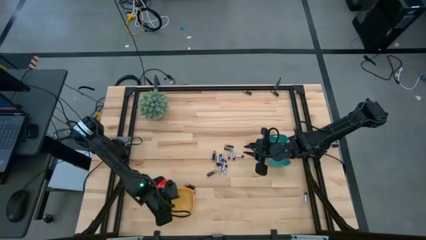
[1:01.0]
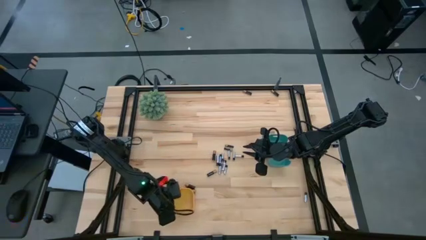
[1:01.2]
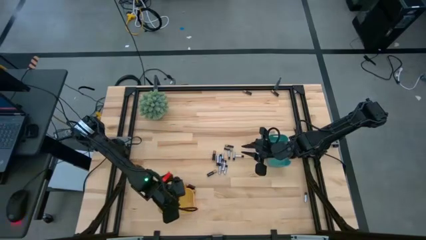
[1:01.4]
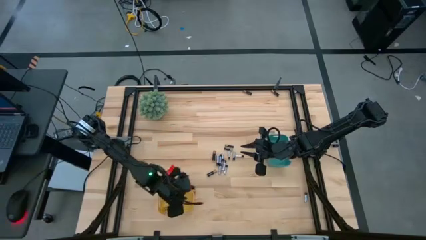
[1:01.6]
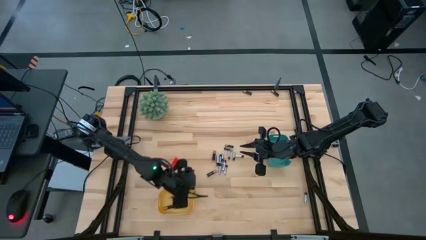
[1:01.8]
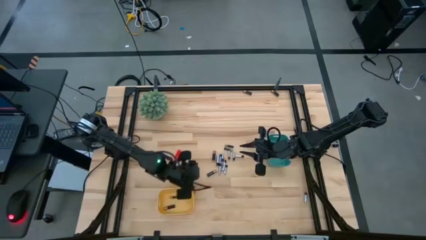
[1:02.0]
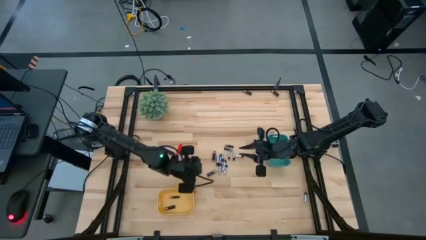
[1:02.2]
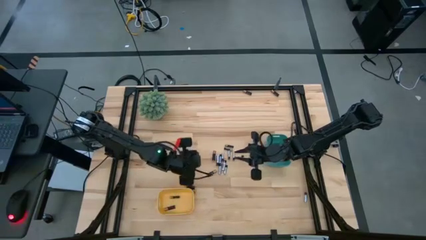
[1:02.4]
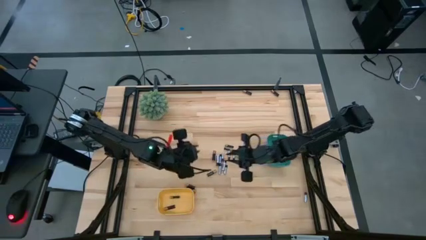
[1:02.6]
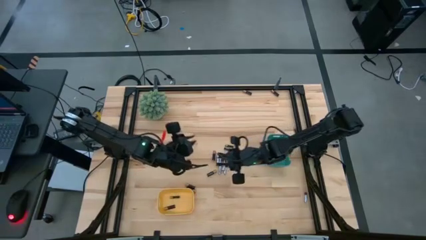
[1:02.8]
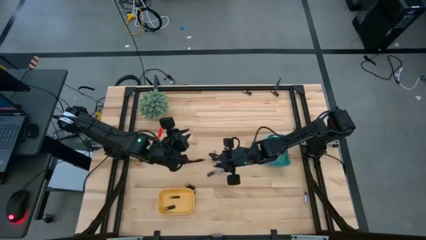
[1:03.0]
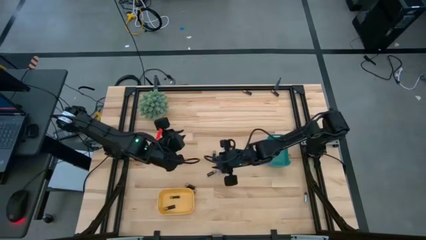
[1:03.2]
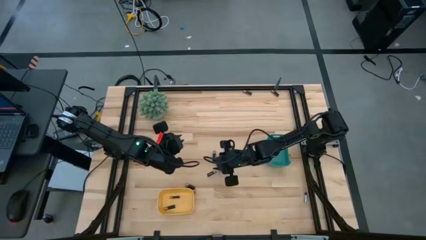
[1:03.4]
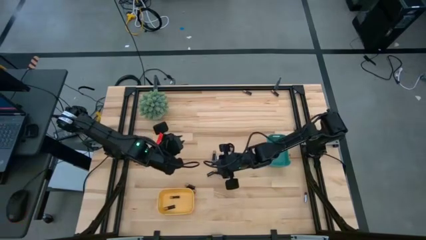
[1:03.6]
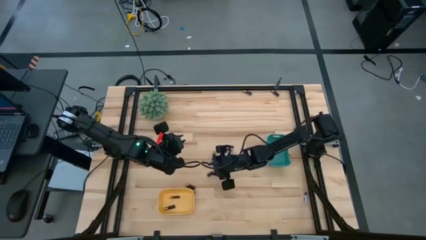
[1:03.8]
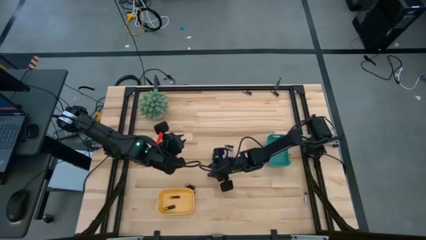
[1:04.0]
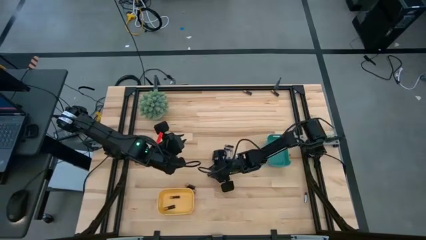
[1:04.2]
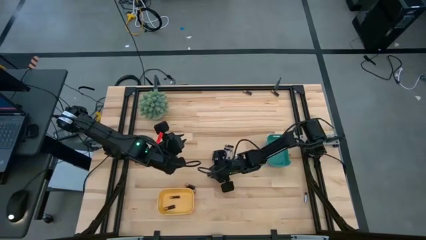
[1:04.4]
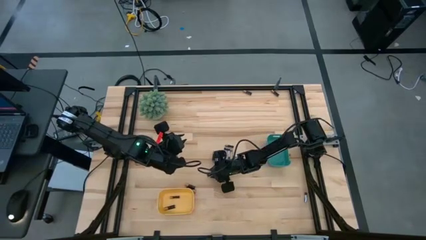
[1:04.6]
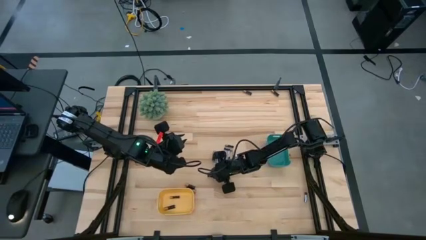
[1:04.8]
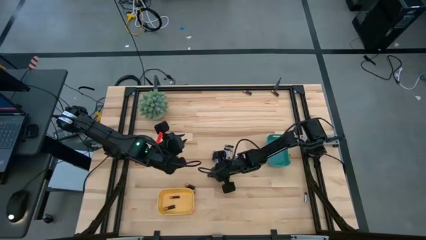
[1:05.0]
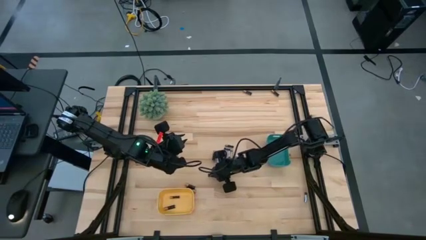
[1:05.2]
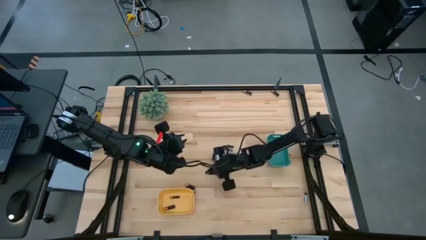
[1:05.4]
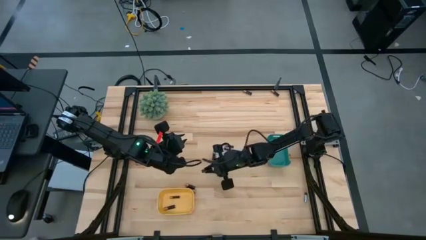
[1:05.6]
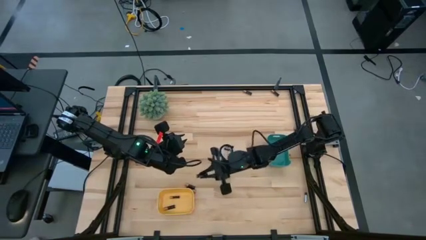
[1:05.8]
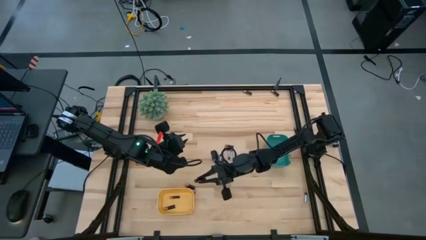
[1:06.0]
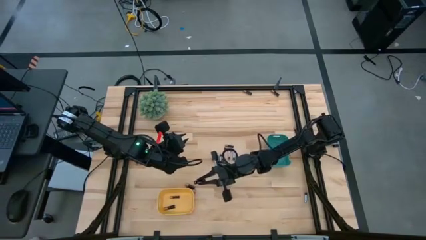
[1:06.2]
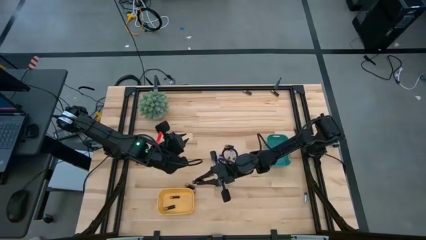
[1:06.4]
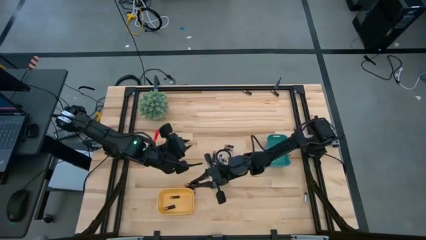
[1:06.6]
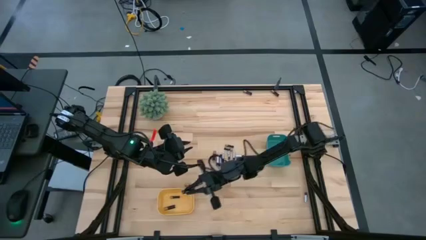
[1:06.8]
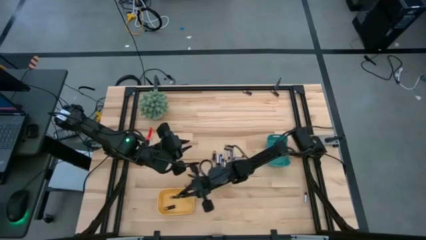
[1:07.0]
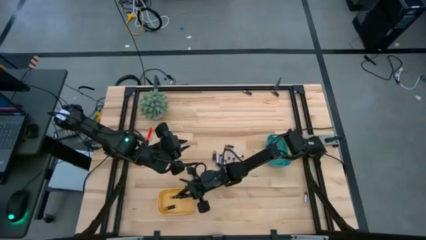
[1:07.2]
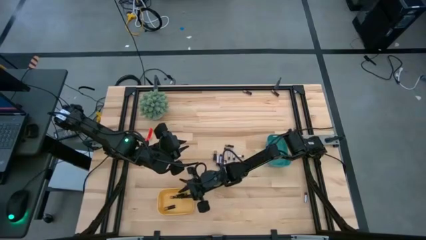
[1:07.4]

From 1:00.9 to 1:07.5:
Task: Sort batteries
Put the black battery into the yellow bin

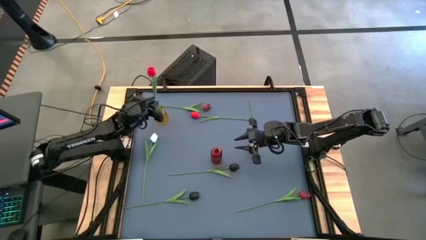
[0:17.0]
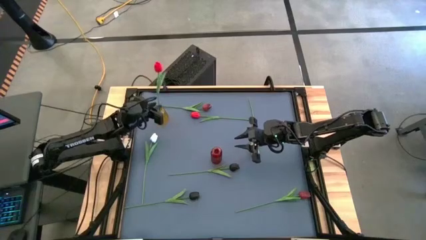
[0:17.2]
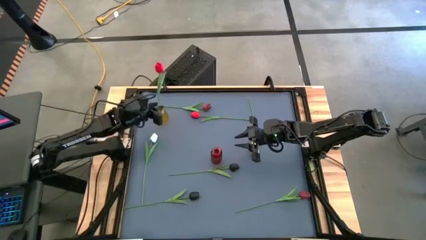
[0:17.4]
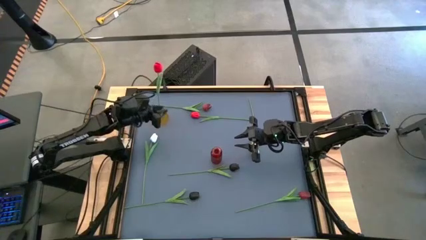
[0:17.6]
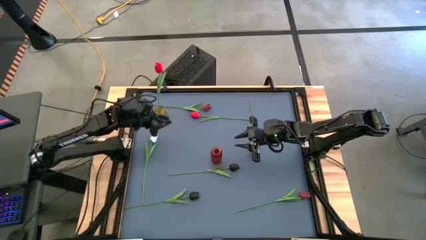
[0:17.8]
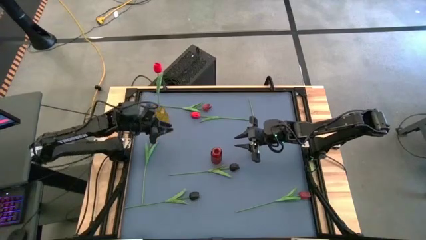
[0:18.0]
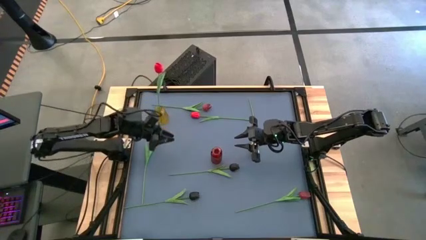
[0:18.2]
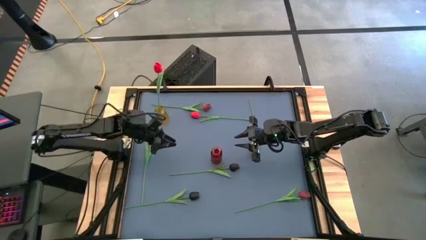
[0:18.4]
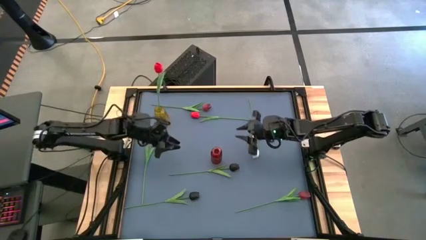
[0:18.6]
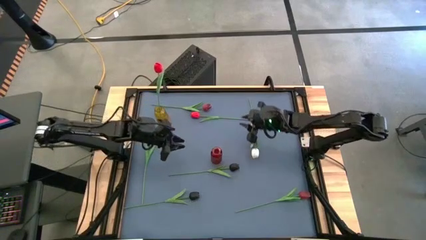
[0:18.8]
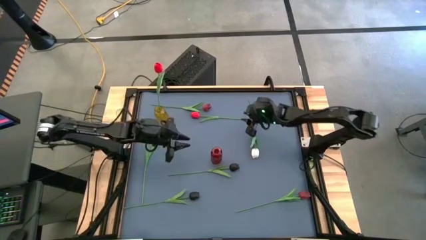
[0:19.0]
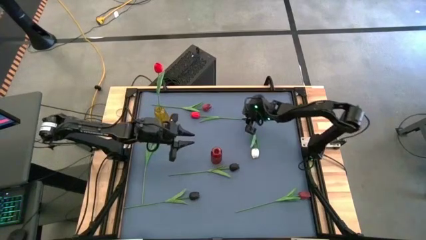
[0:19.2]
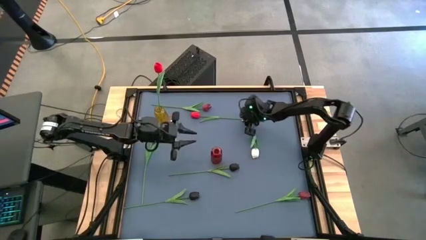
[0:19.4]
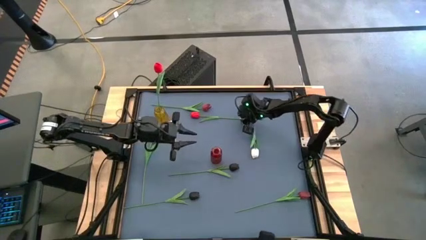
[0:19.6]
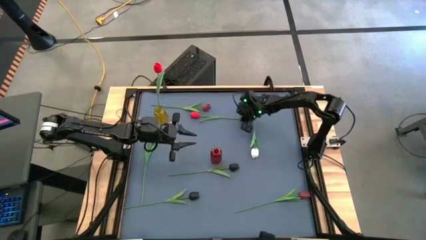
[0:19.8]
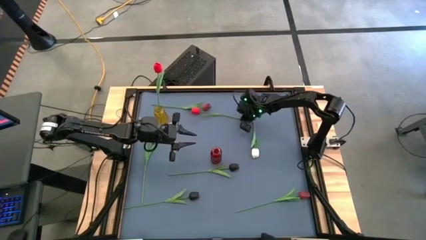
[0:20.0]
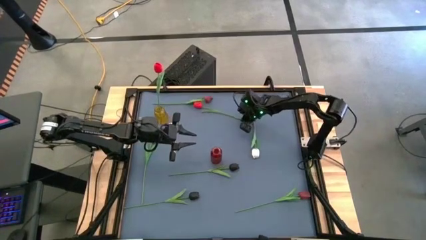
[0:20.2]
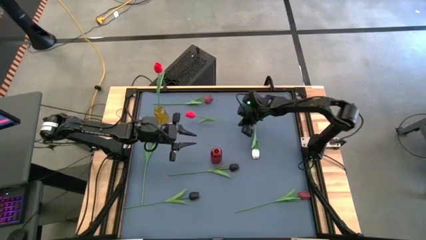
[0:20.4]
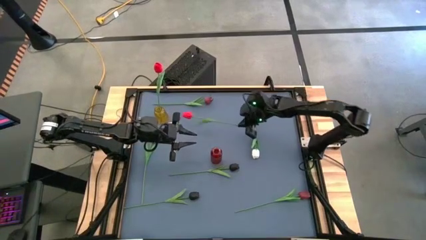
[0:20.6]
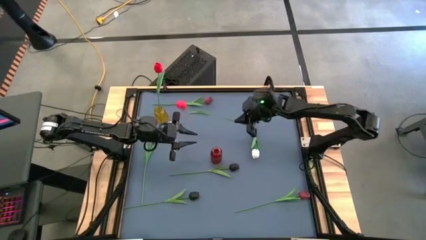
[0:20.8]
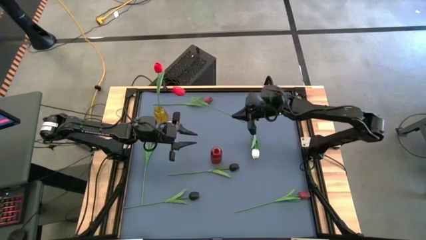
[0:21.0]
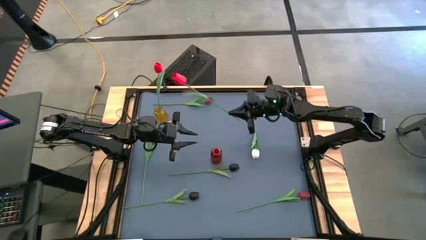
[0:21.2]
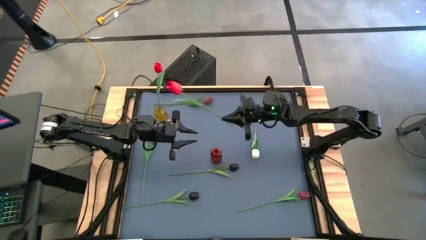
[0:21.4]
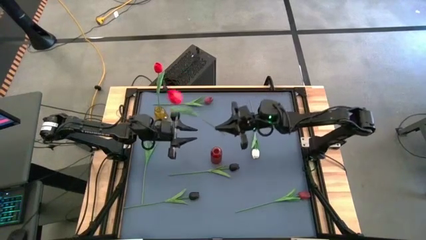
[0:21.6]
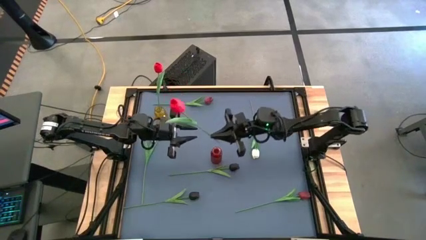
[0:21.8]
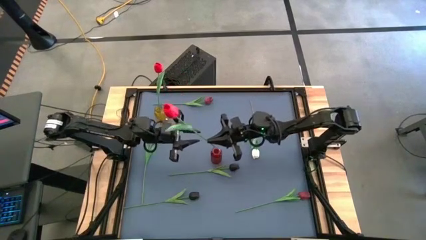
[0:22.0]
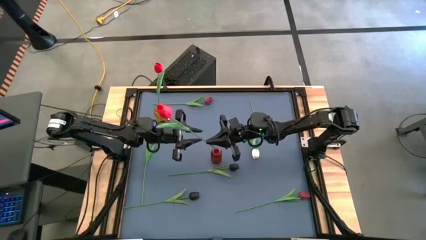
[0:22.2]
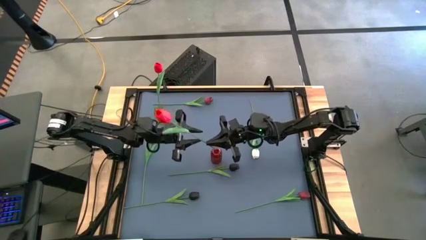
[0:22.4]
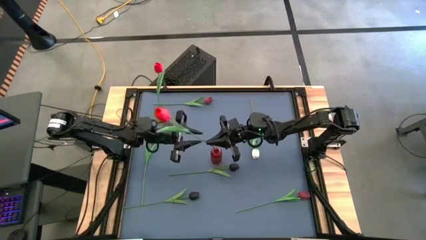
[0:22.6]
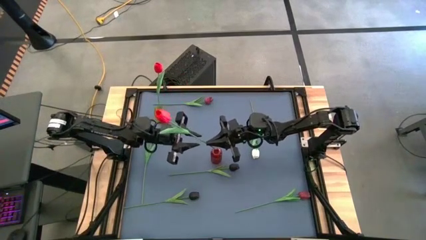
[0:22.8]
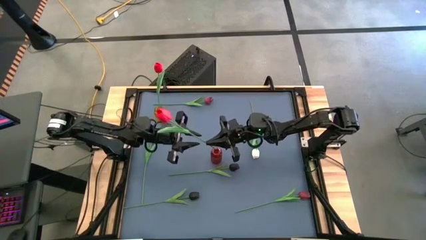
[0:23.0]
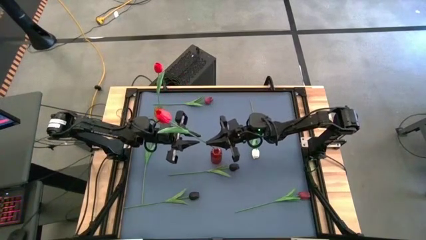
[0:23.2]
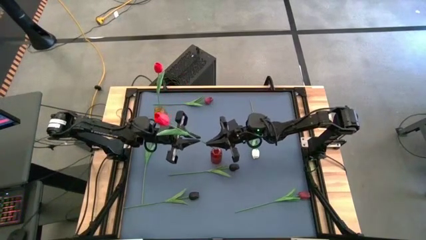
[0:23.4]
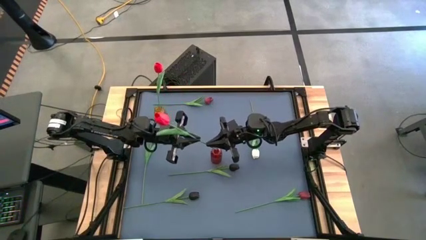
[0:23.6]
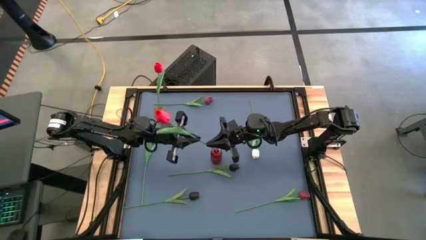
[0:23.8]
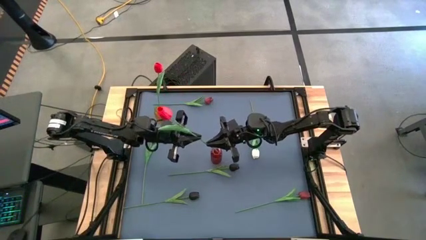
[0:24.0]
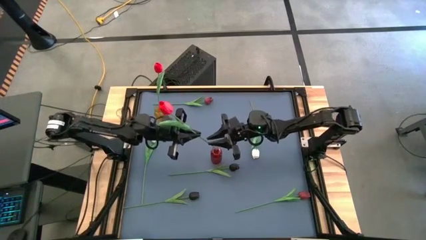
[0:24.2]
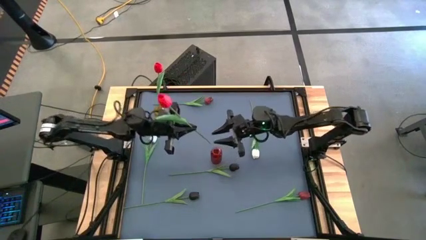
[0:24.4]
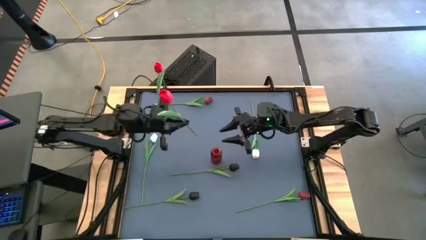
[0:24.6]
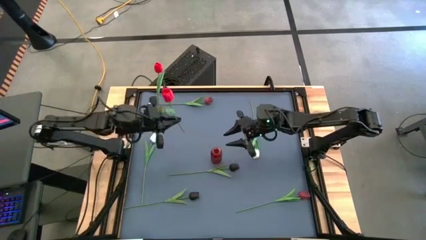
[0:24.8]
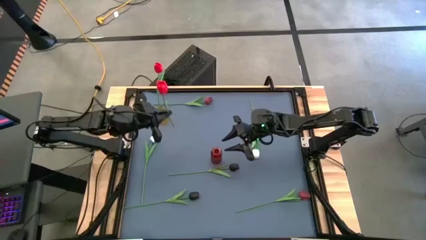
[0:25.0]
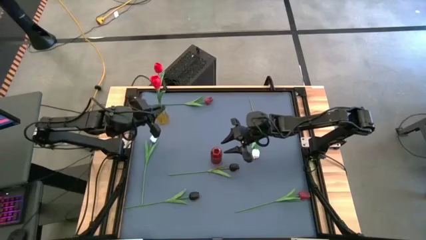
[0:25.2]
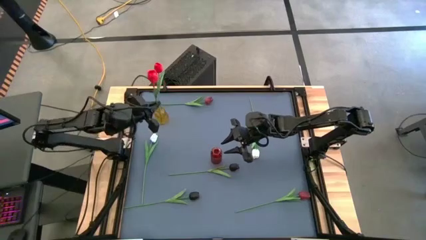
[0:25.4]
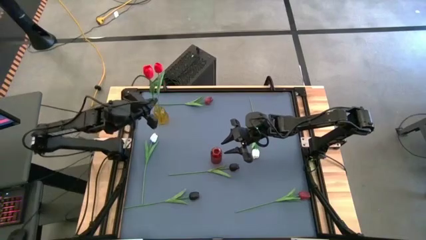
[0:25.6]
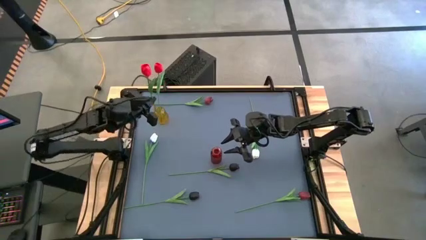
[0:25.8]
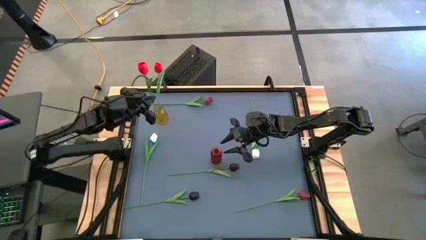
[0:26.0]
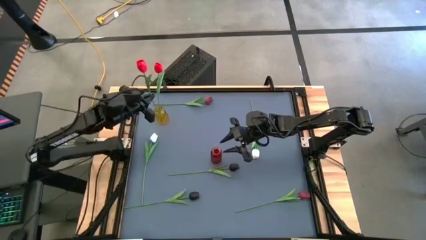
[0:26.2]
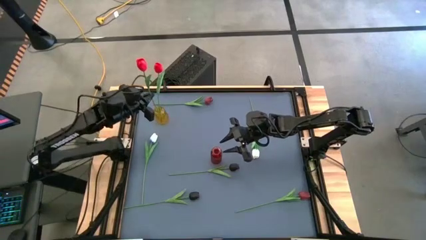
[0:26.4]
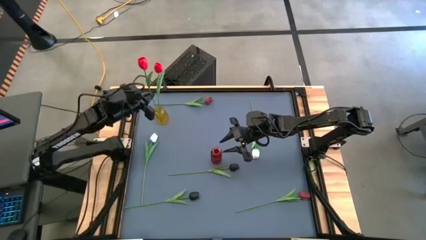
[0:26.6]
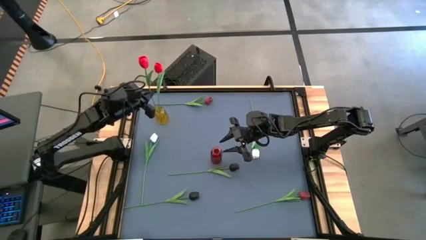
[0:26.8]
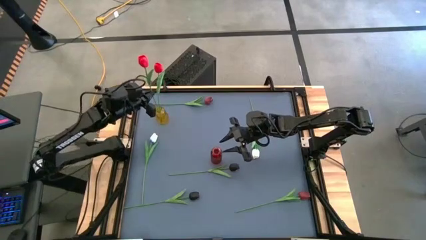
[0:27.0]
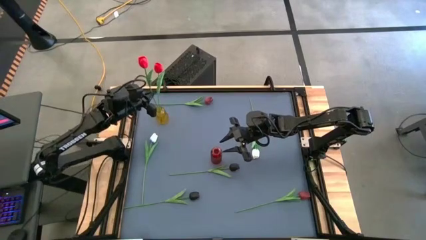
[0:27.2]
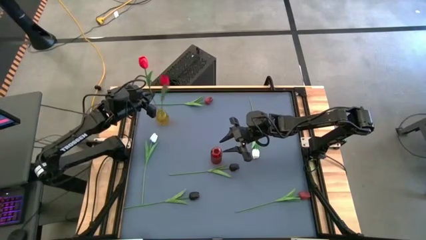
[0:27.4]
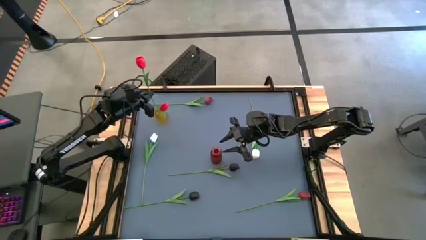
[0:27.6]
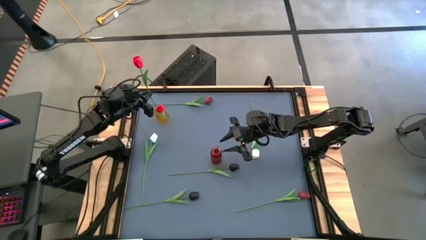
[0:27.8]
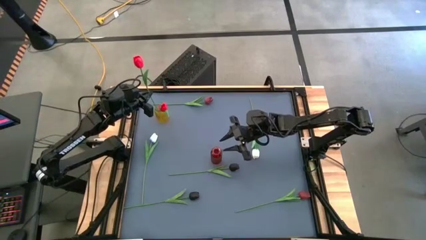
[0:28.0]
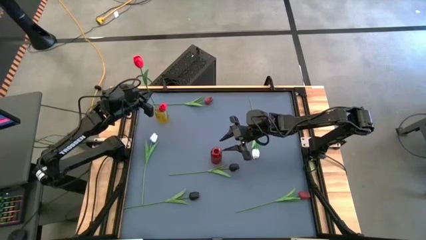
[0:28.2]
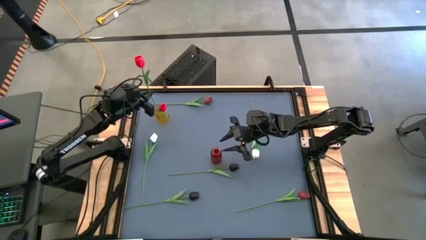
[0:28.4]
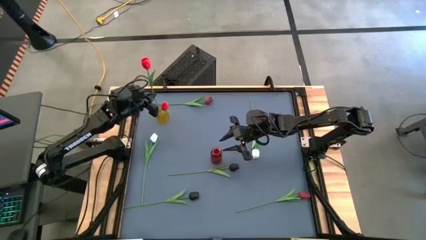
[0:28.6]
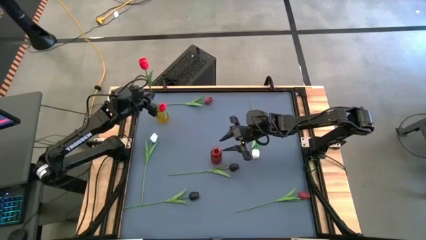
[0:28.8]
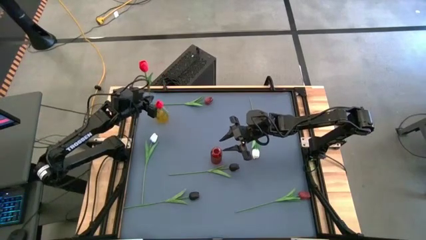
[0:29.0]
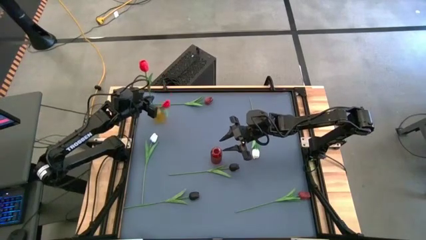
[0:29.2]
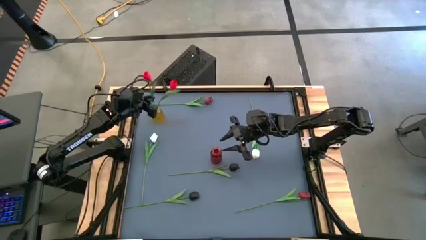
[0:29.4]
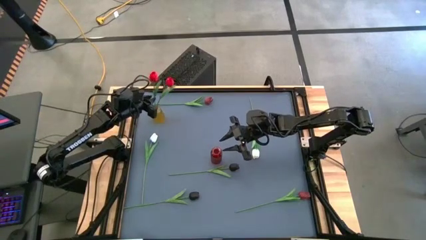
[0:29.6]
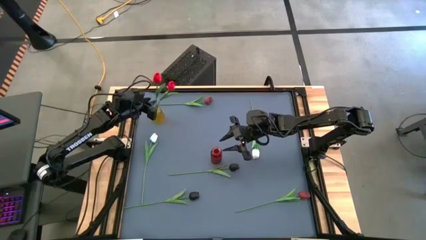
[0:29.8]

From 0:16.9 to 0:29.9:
Task: Sort flowers into vase by color
Put the red tulip into the yellow vase
